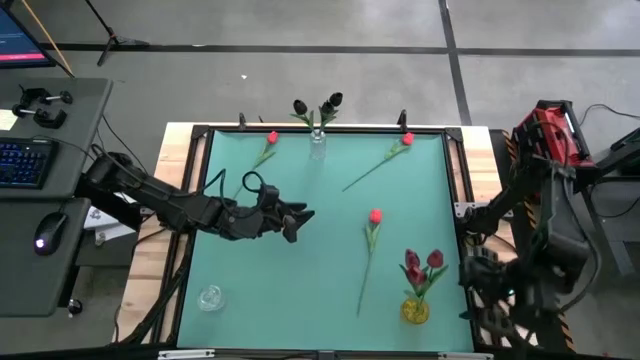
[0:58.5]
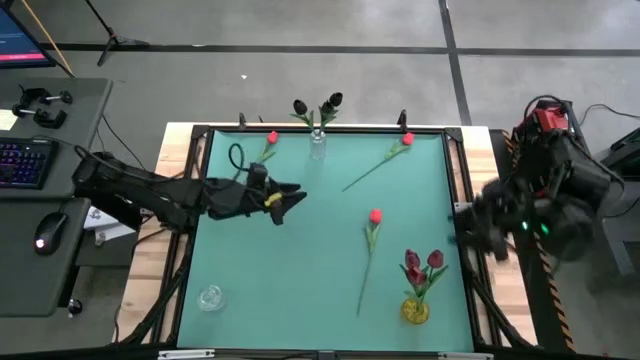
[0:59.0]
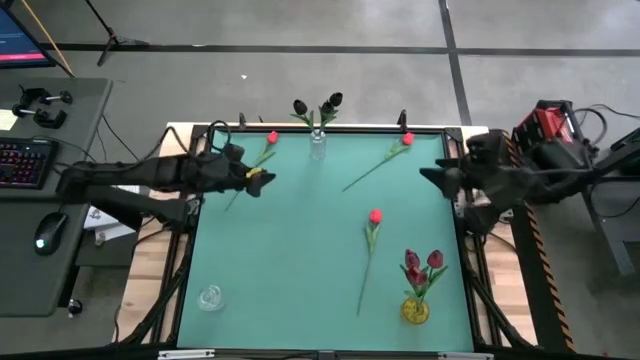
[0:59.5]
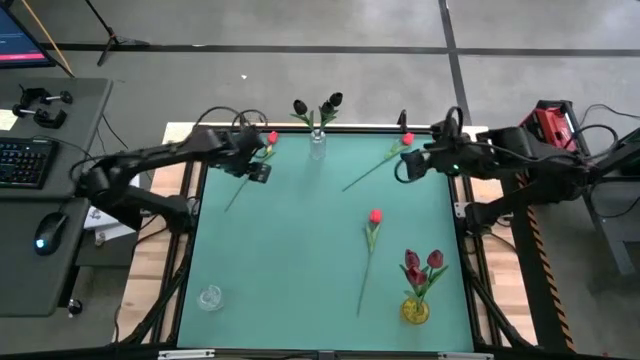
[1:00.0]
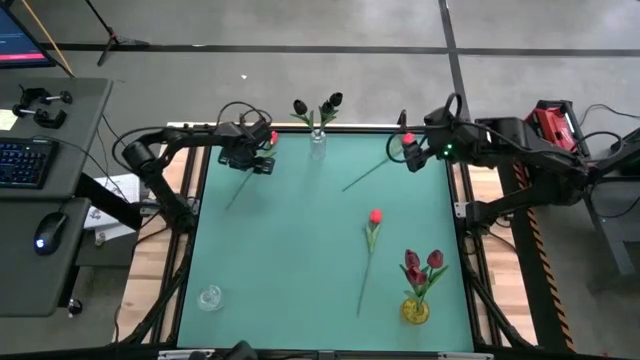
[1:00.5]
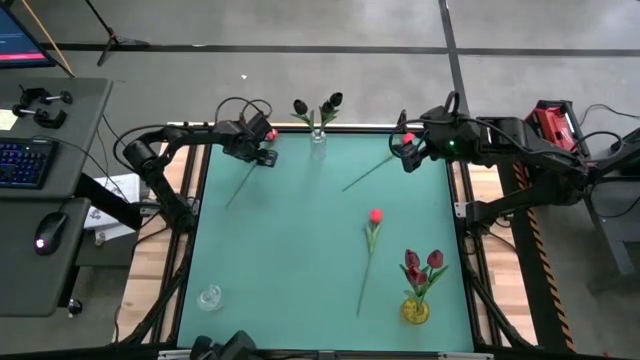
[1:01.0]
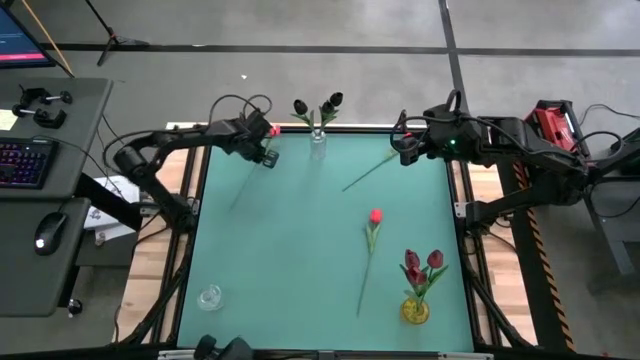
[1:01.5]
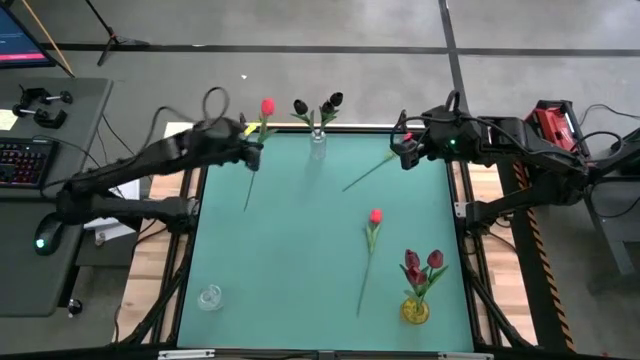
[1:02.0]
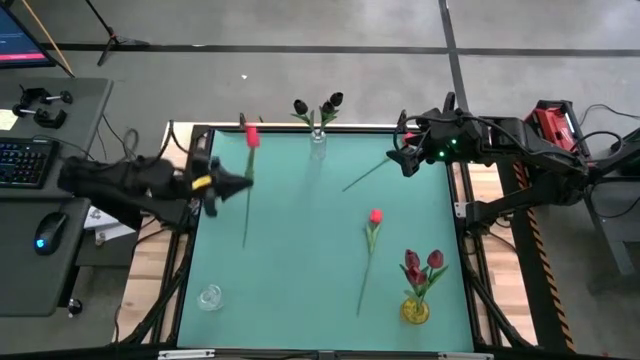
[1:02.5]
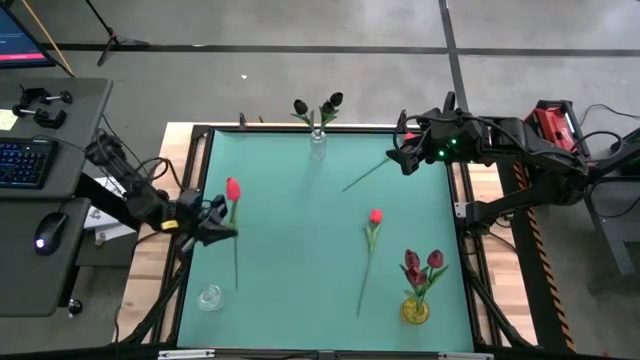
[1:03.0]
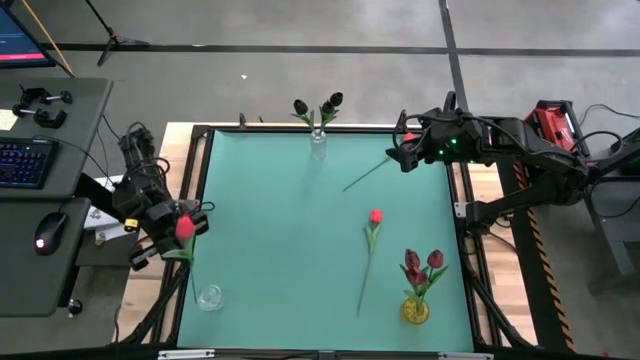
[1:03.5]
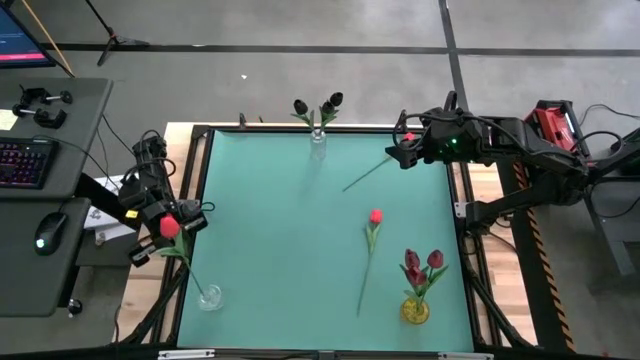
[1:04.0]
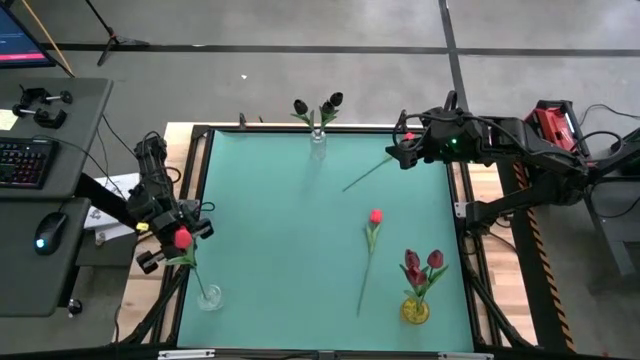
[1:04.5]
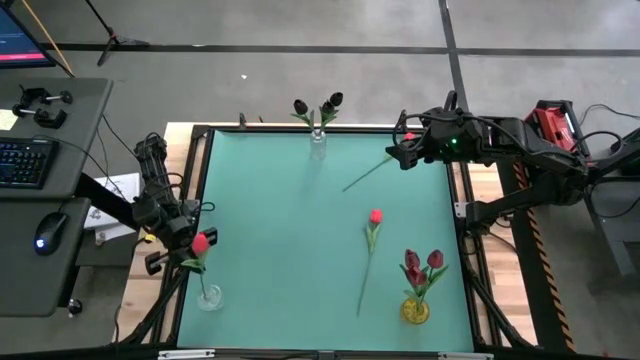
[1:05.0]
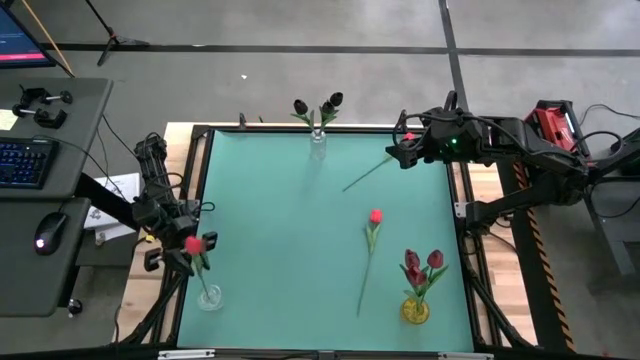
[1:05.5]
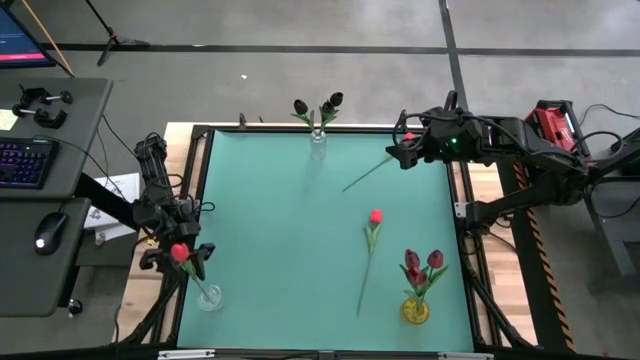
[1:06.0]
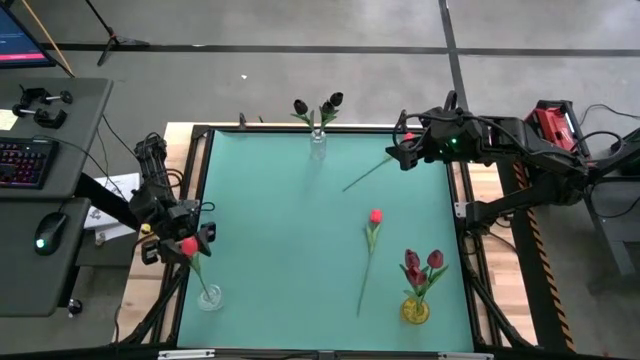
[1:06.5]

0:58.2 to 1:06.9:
Task: Sort flowers into vase by color
Put the top left red tulip into the bottom transparent vase

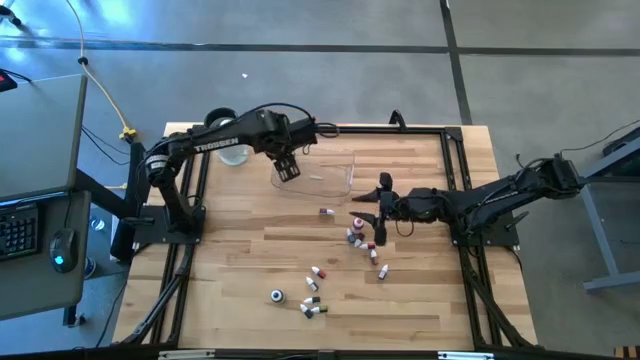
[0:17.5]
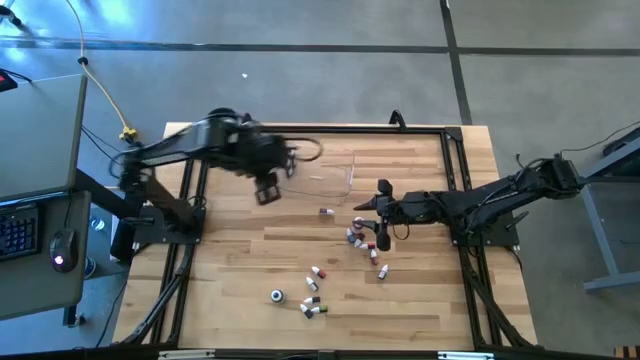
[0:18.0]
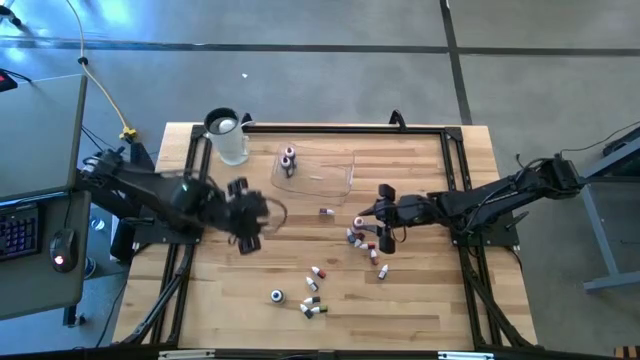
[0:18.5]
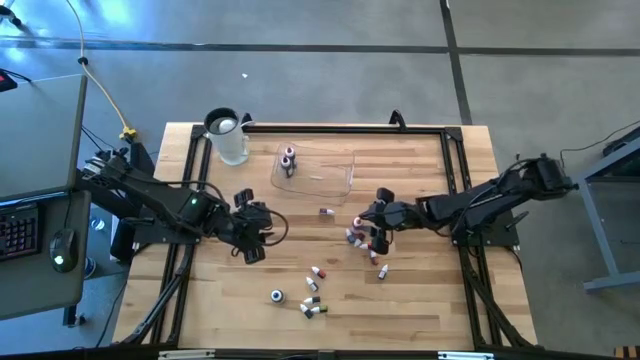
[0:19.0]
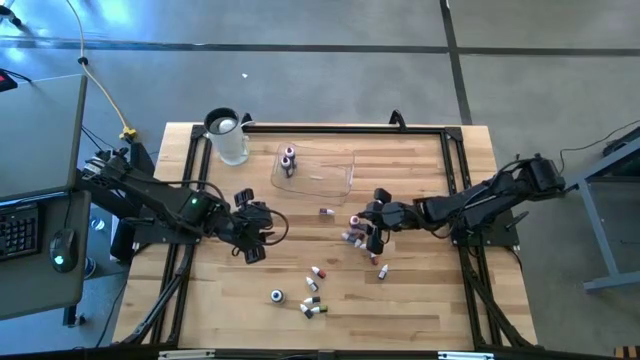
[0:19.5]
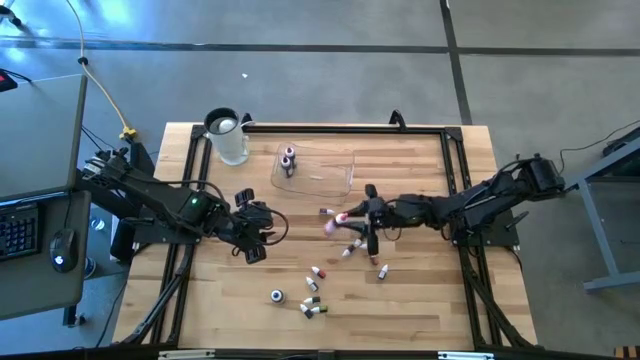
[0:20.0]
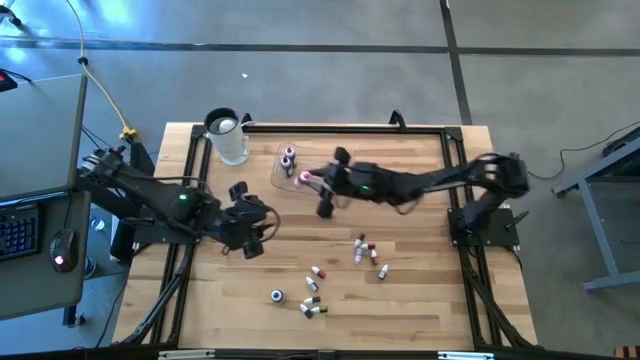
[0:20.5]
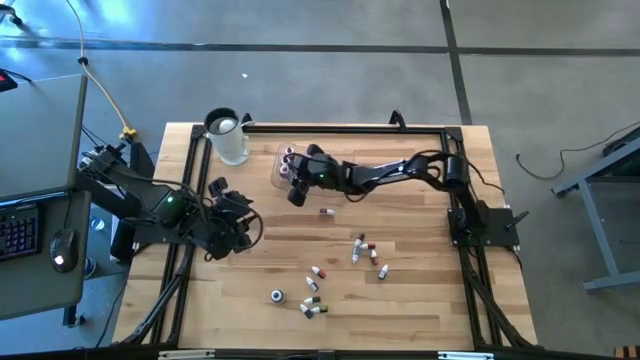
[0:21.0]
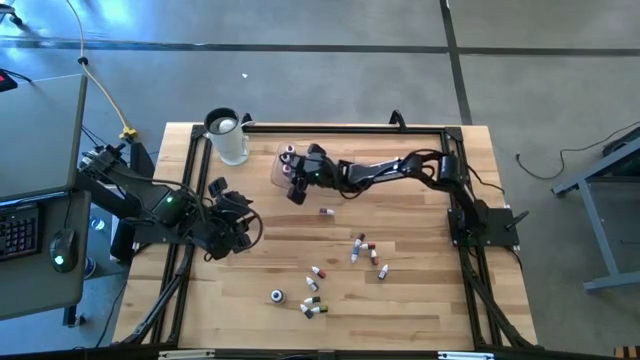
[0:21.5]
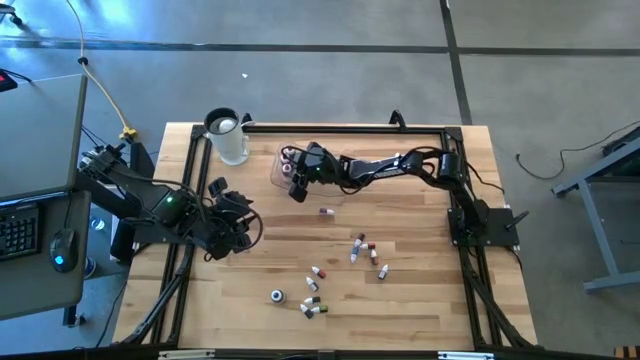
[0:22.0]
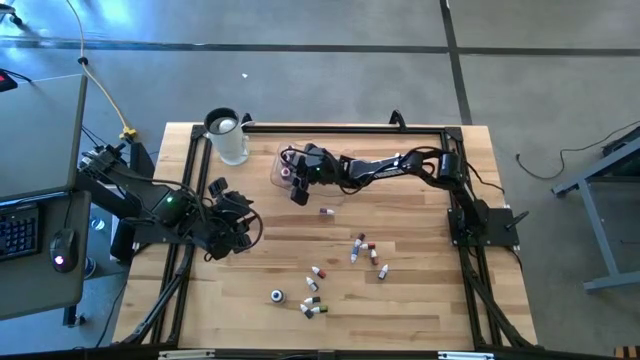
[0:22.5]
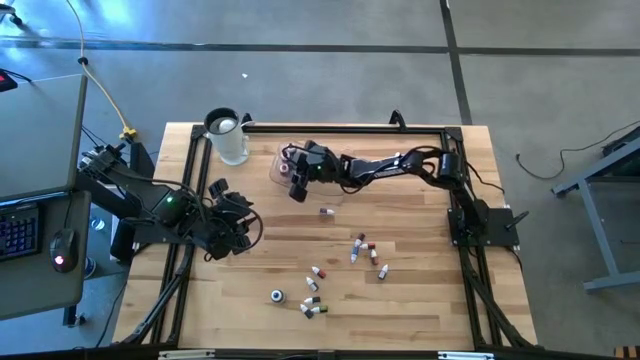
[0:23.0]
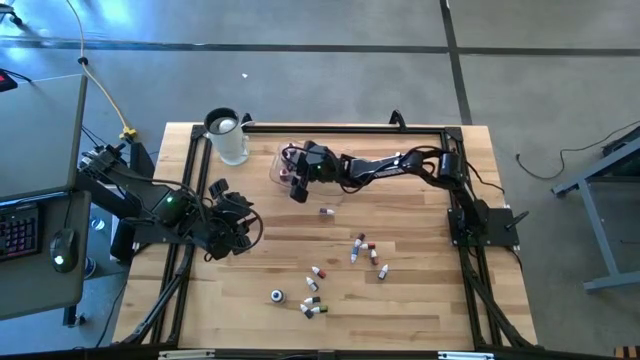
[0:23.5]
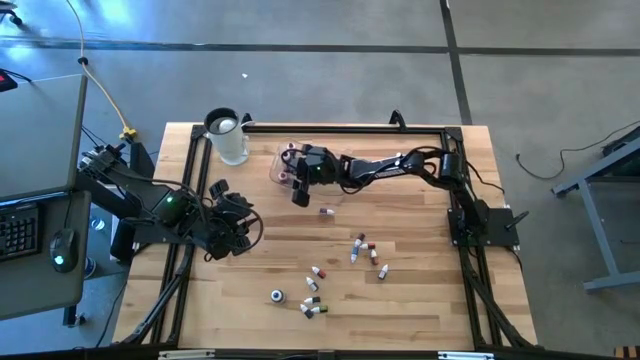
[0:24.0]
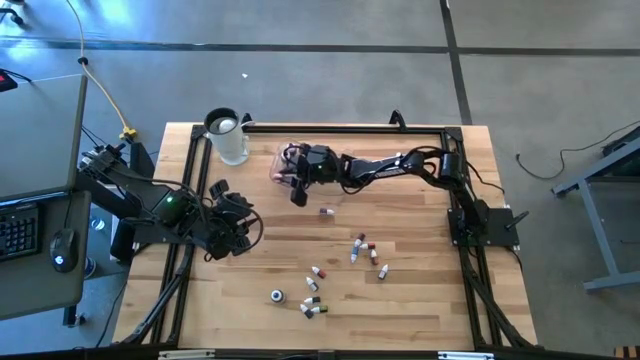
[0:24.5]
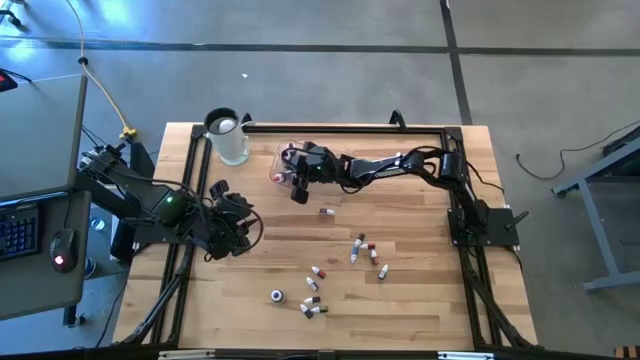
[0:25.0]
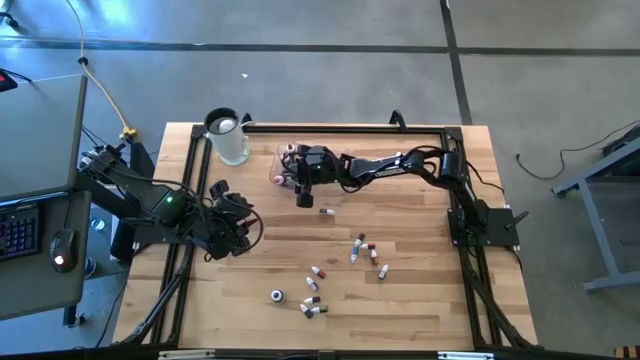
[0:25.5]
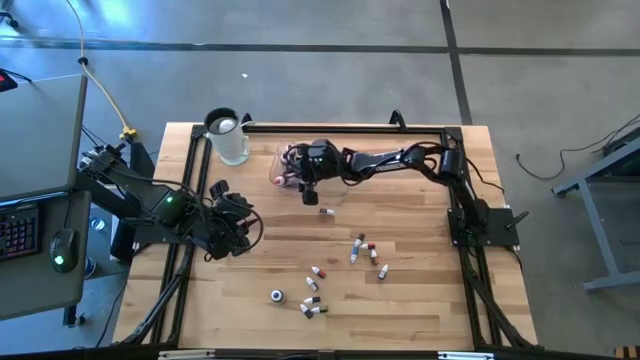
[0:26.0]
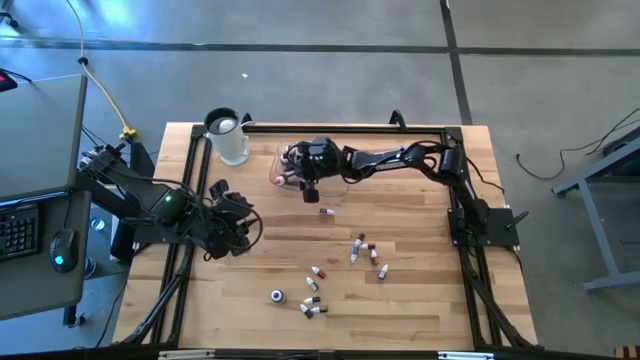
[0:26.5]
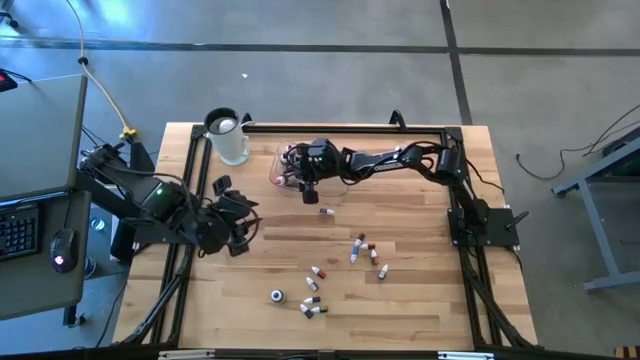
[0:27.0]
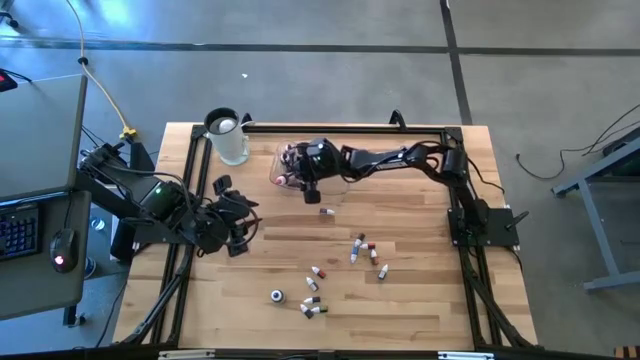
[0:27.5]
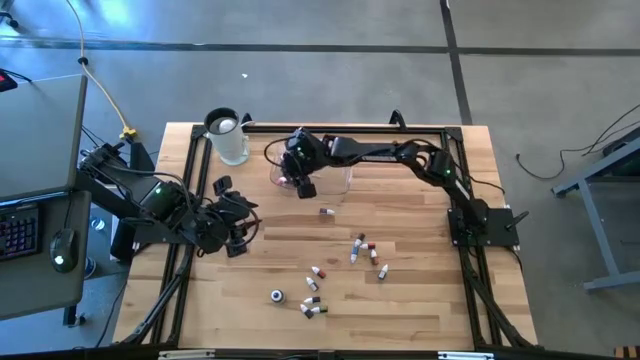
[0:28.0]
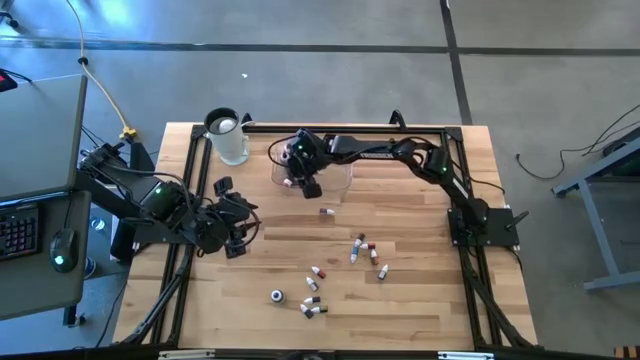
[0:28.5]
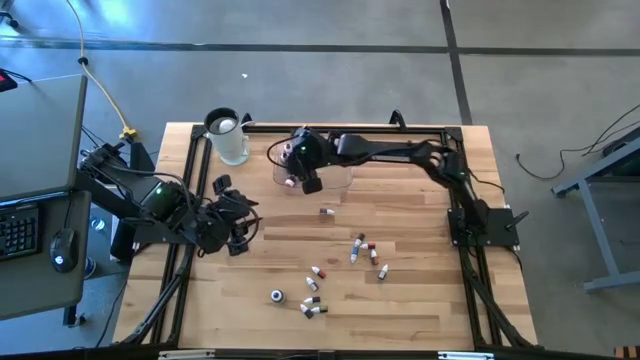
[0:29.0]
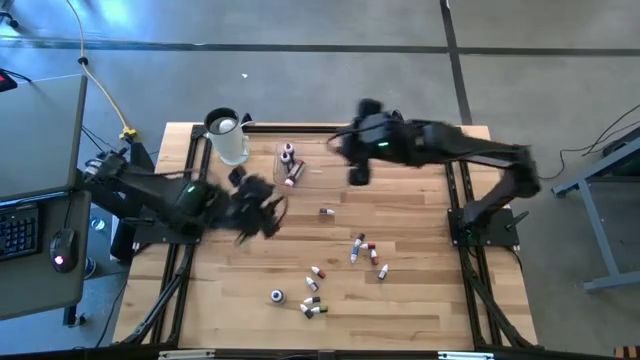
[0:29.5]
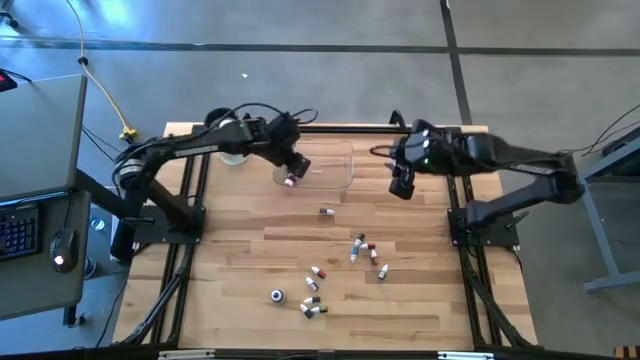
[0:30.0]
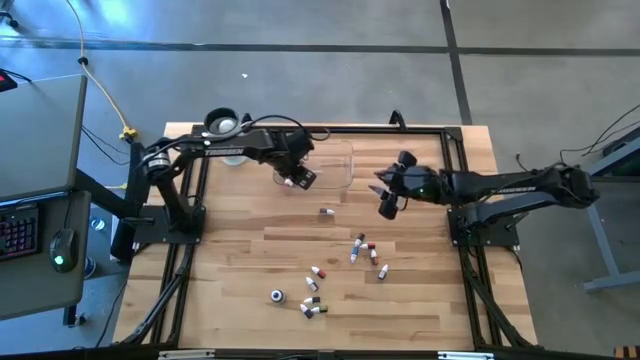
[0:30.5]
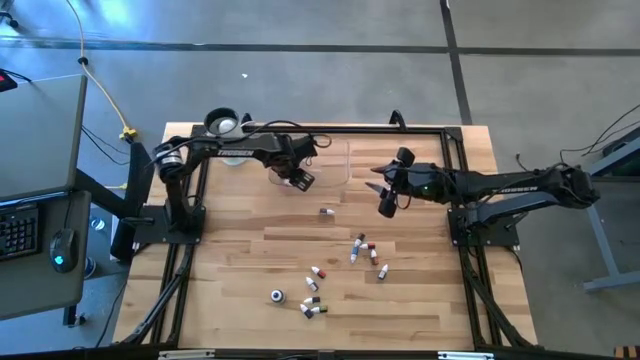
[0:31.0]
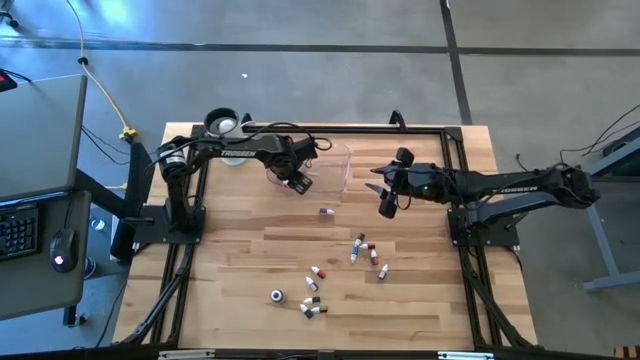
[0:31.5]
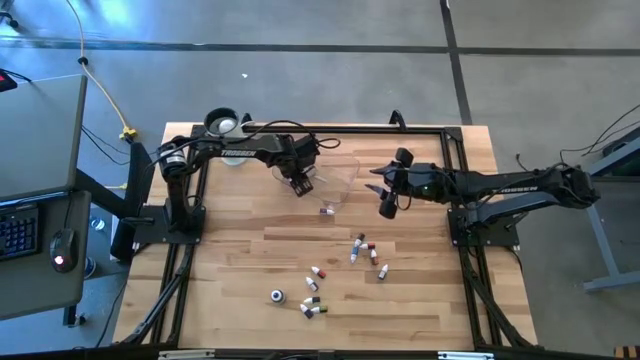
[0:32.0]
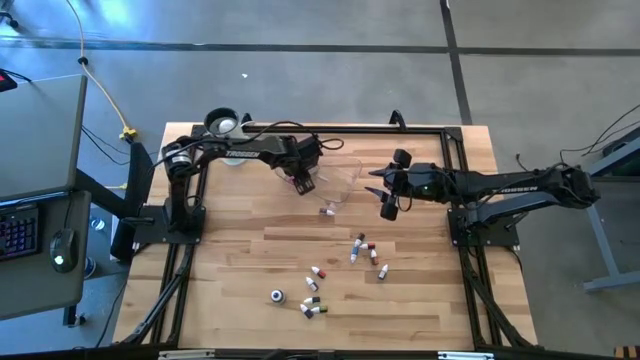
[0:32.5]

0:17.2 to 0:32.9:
Task: Pick & Place food coloring
Put the large pink food coloring bottle into the bin
